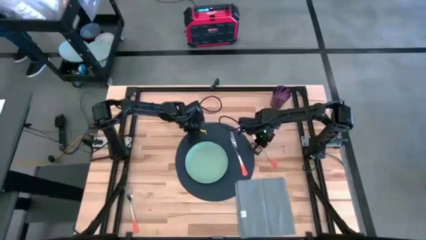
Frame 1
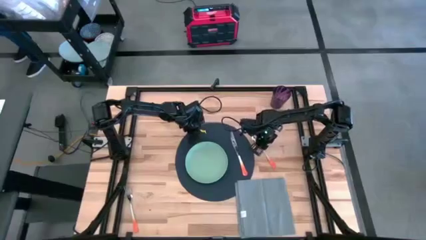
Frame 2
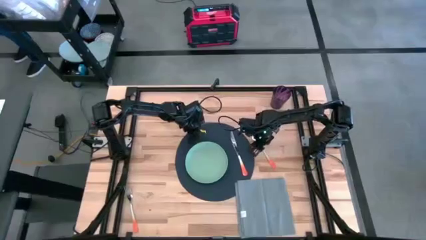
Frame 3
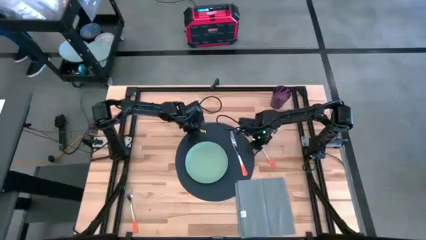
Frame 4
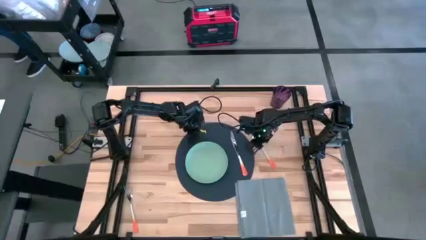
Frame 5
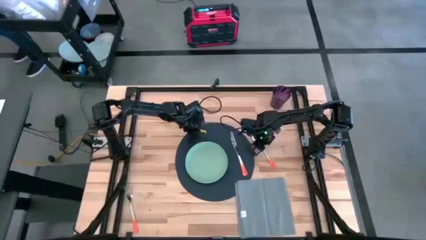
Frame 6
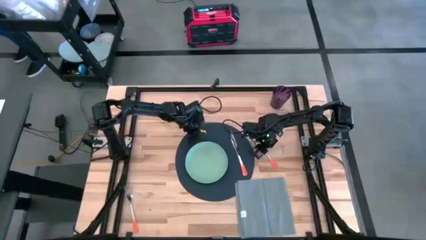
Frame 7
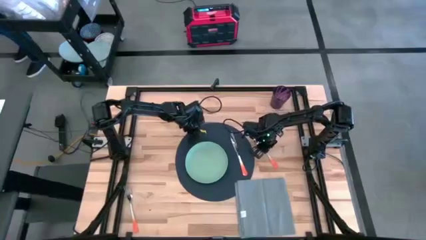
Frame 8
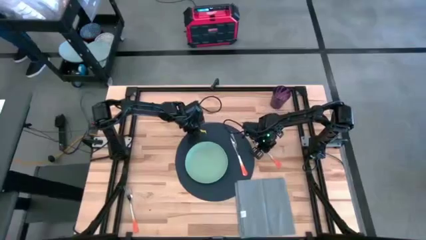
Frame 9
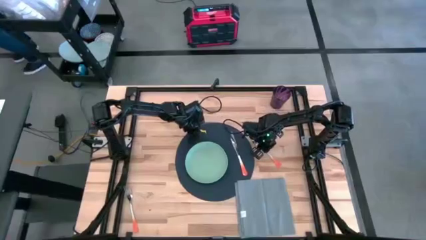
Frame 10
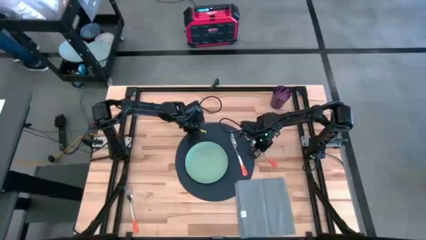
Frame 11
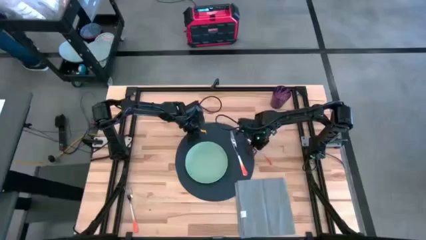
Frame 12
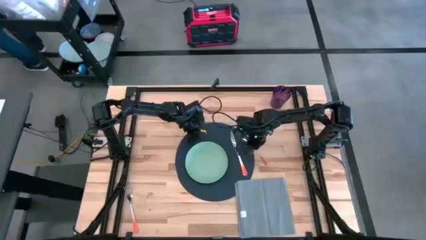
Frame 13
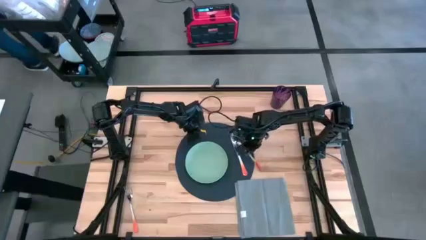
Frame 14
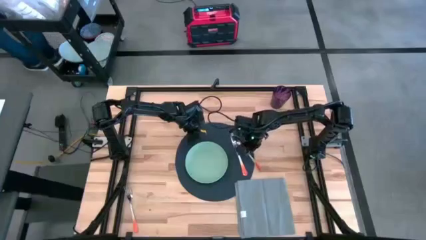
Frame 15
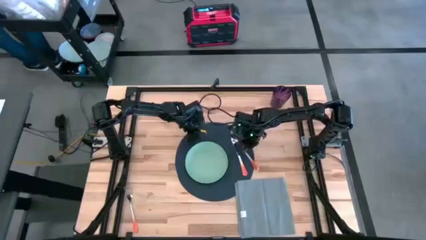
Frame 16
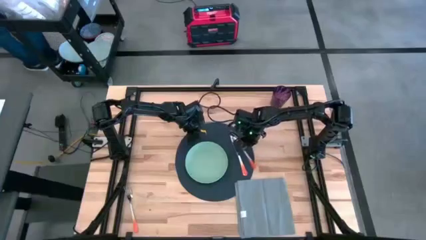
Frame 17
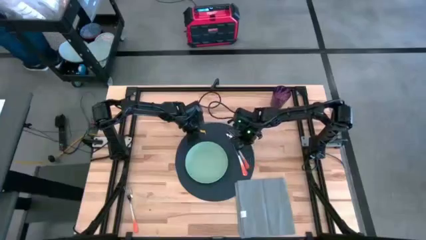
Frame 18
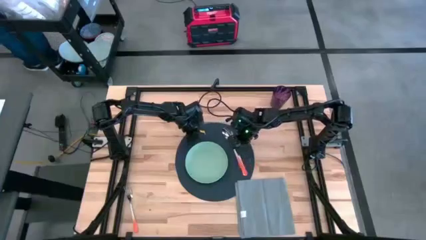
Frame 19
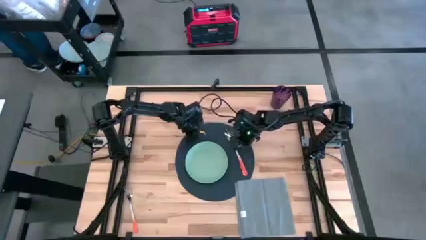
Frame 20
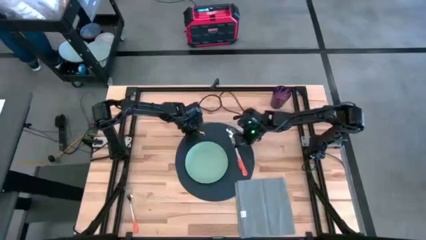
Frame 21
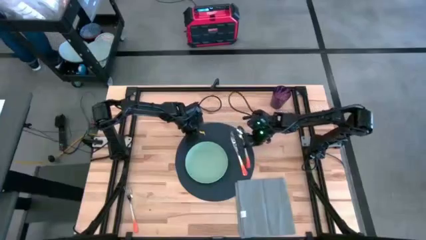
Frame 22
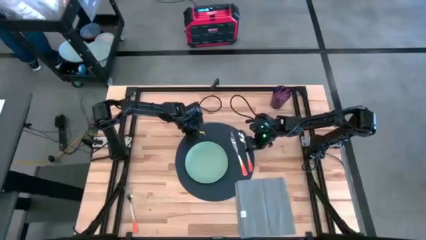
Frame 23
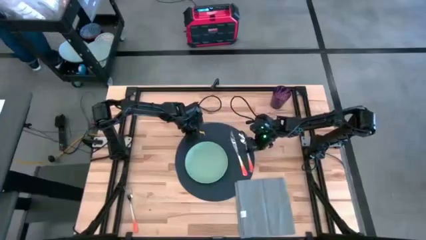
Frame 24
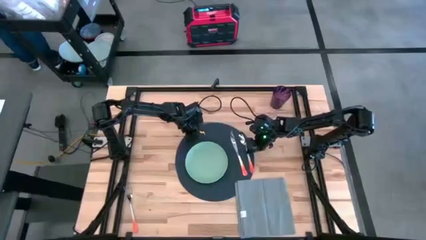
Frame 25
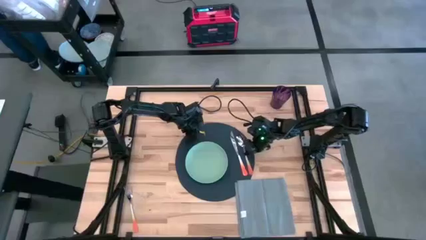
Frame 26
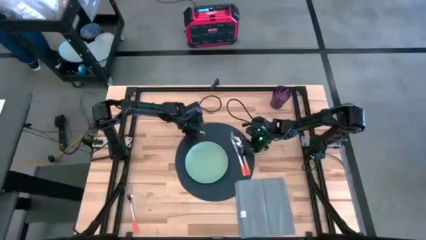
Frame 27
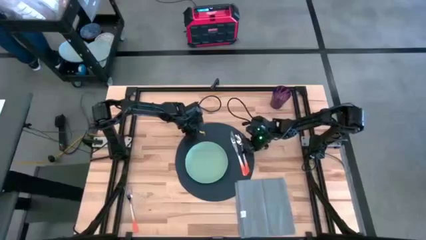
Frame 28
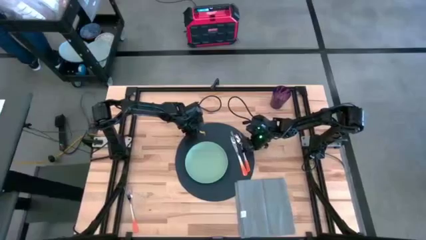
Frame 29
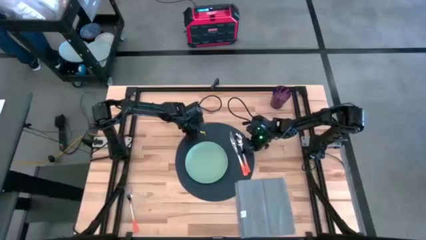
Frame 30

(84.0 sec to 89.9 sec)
Task: Set table place
Put the orange spoon on the blue placemat to the right of the orange fork

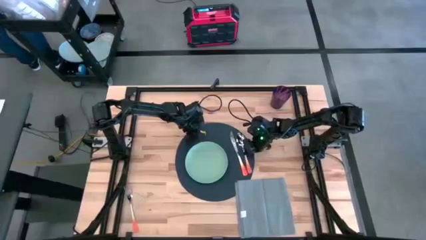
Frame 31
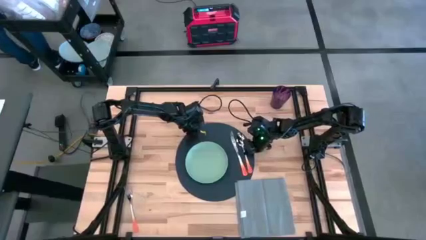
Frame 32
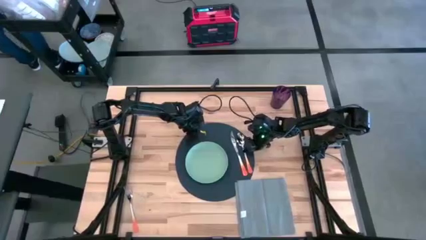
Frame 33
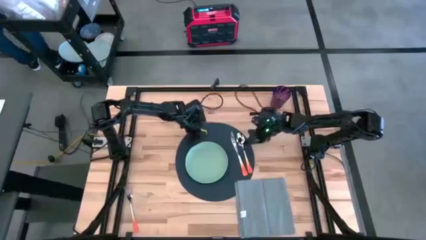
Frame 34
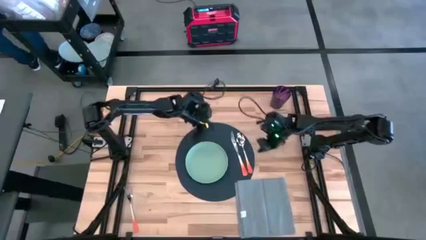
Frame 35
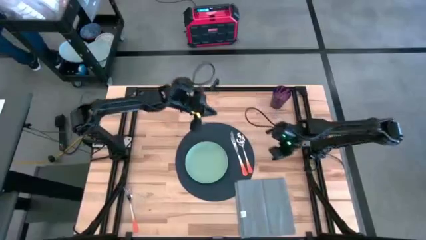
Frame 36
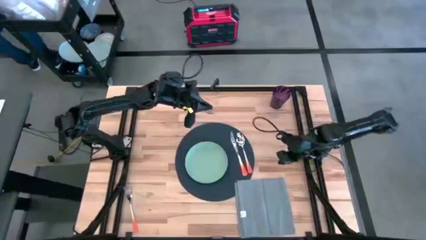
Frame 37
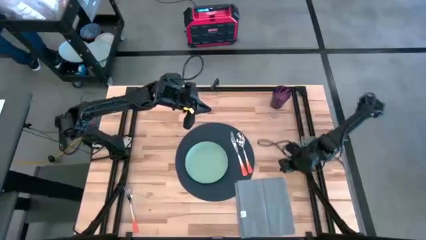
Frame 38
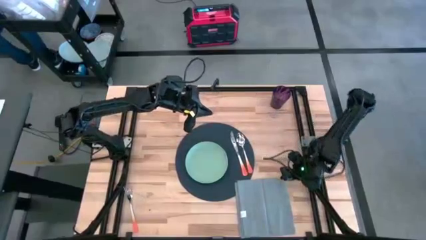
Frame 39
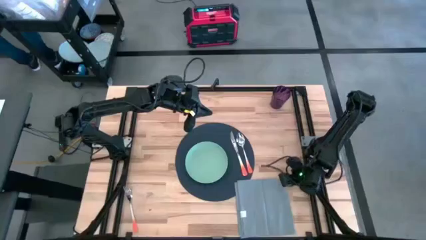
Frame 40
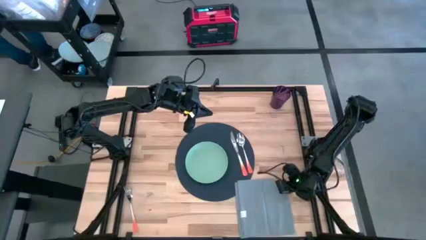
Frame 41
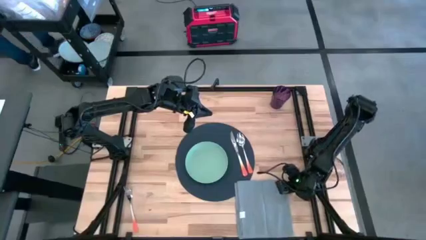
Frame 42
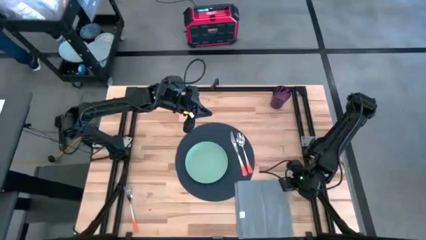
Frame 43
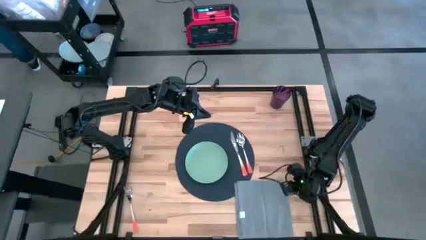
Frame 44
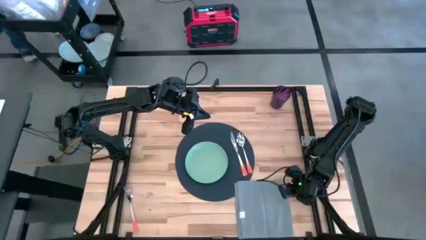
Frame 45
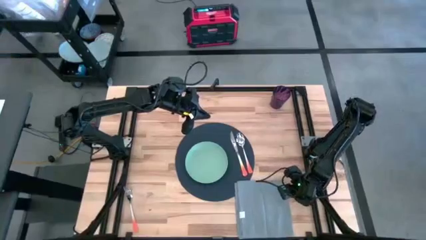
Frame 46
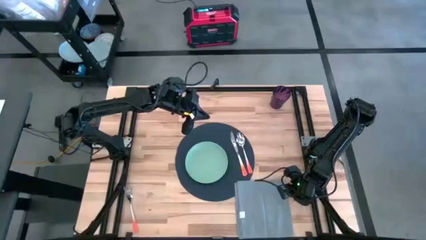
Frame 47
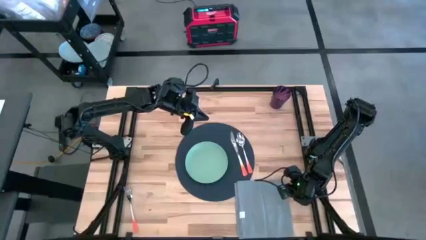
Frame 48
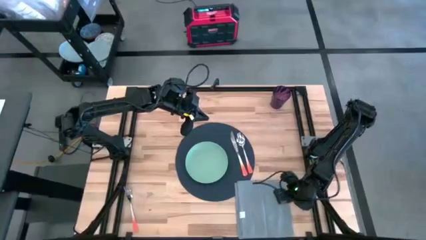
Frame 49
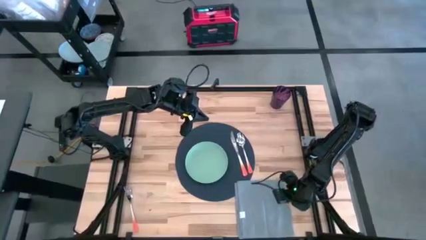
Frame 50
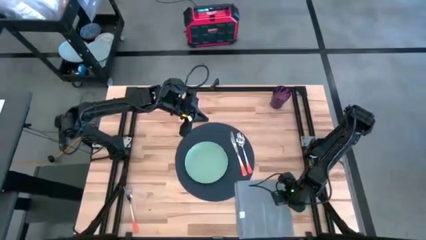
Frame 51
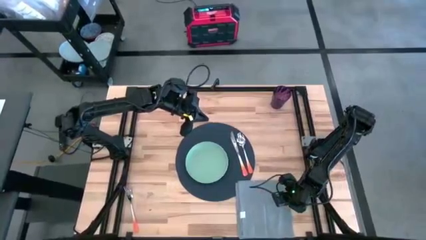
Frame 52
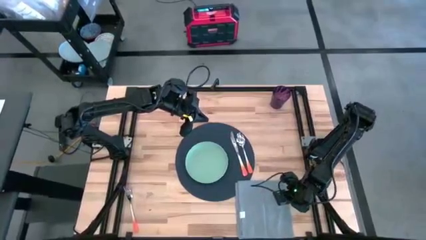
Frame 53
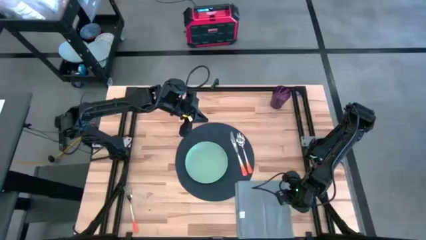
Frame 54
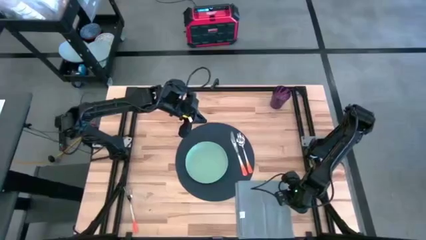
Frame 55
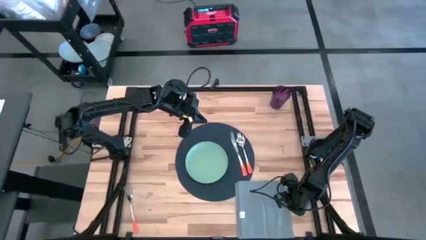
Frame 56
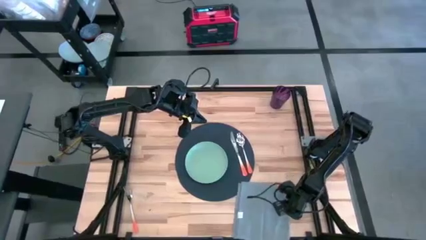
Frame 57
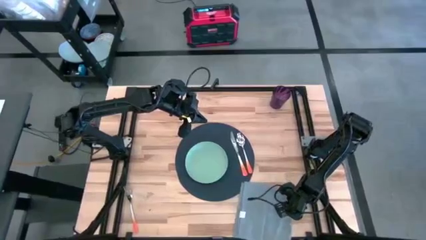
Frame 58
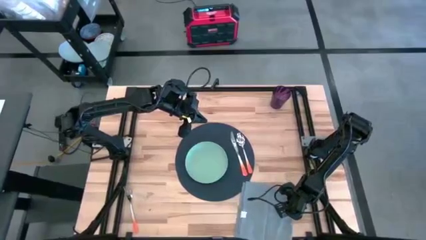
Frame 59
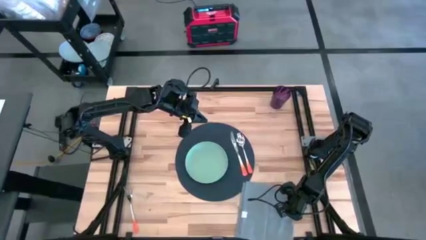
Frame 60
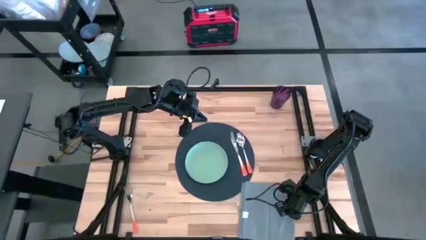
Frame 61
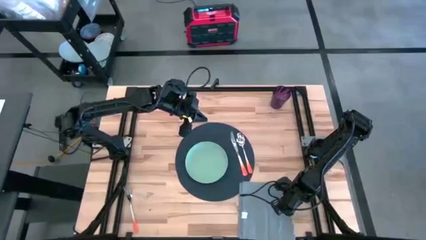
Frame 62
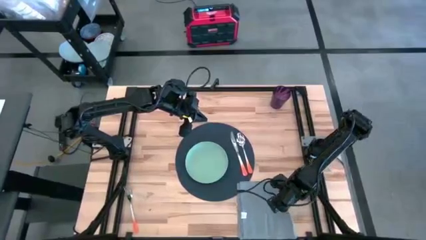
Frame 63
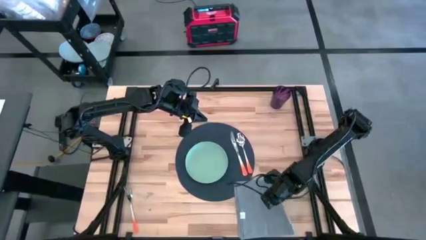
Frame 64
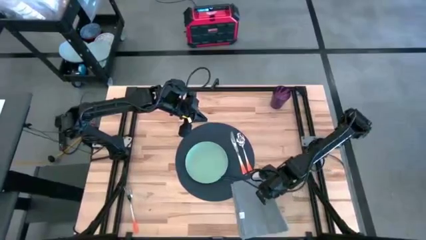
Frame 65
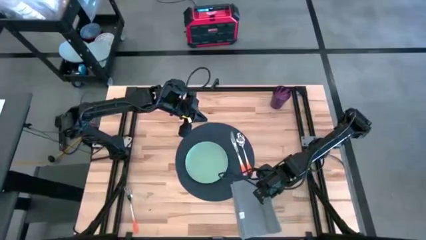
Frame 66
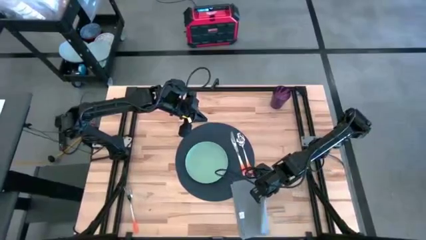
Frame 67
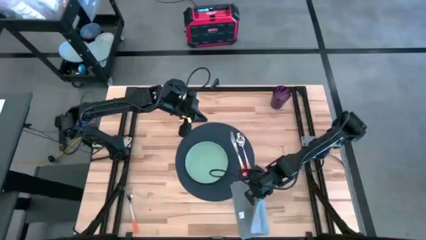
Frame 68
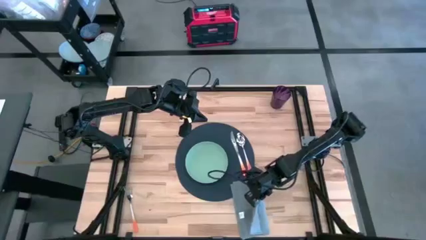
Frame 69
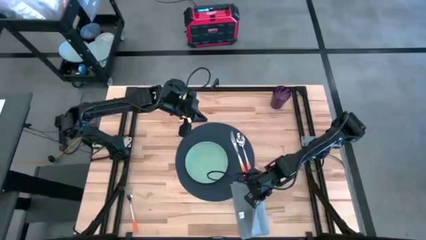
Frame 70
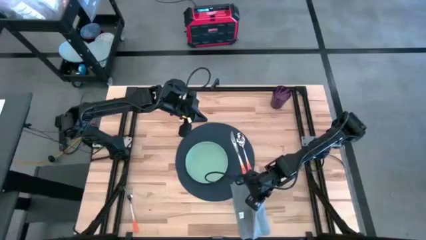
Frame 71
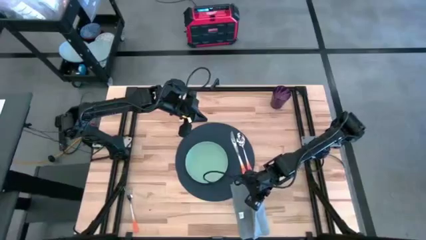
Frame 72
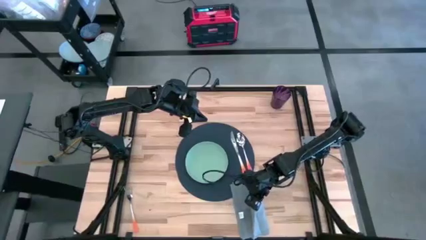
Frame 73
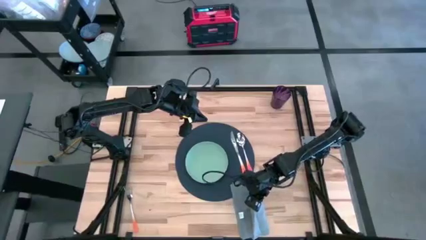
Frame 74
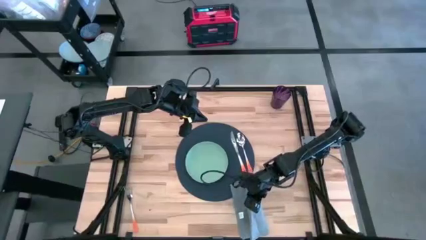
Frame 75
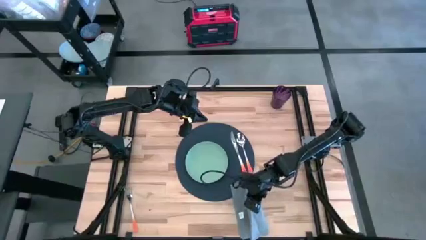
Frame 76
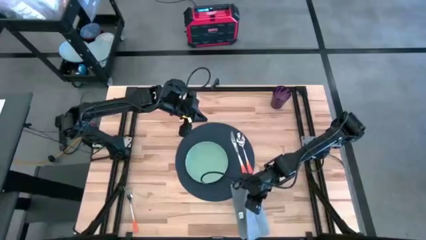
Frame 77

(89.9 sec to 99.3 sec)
Fold the gray table napkin

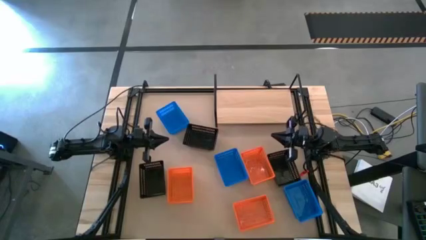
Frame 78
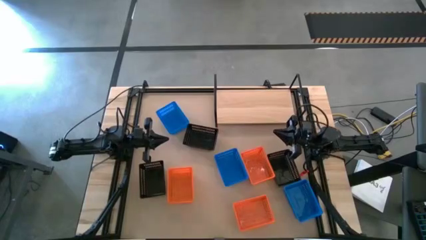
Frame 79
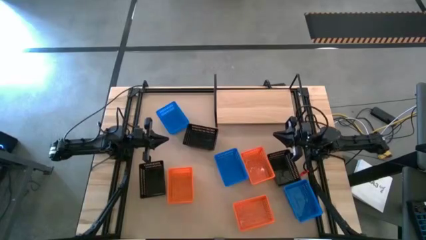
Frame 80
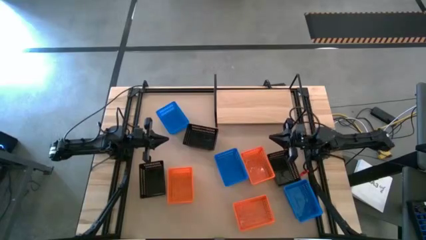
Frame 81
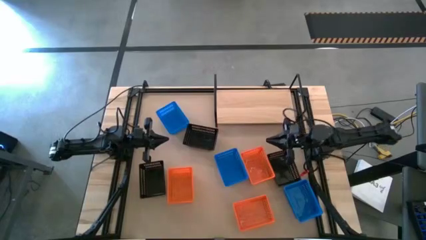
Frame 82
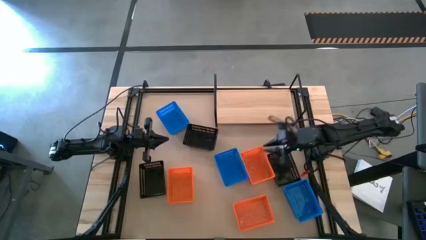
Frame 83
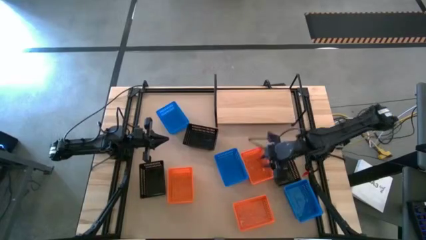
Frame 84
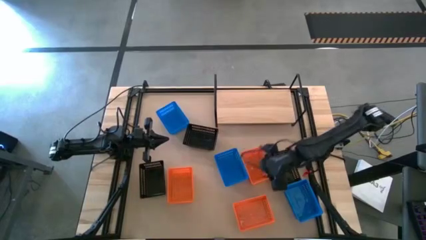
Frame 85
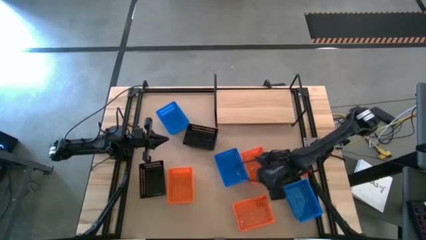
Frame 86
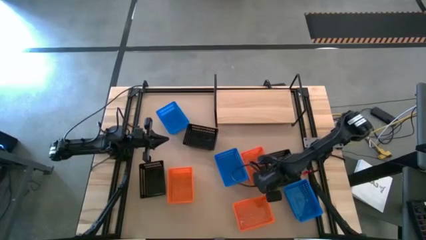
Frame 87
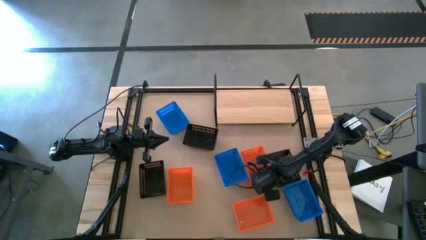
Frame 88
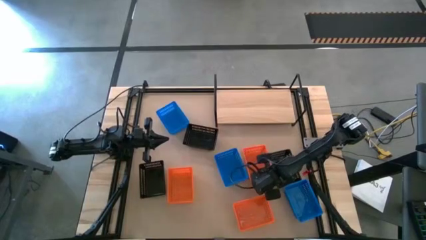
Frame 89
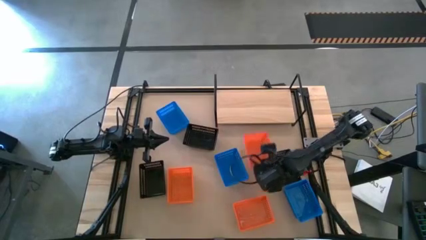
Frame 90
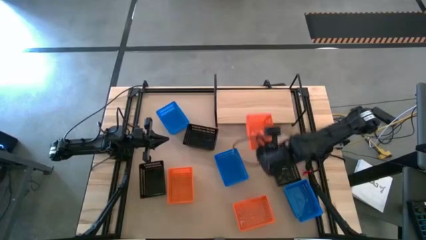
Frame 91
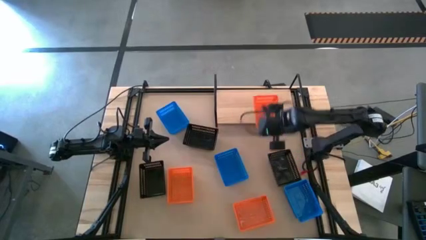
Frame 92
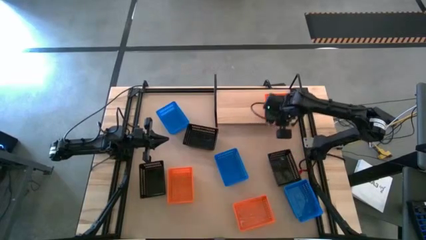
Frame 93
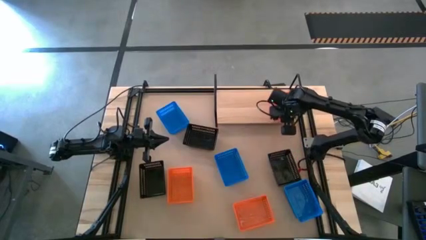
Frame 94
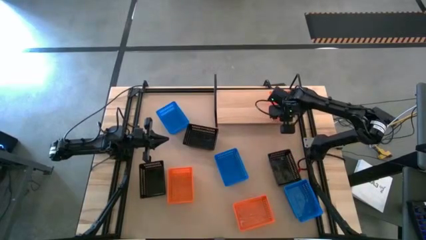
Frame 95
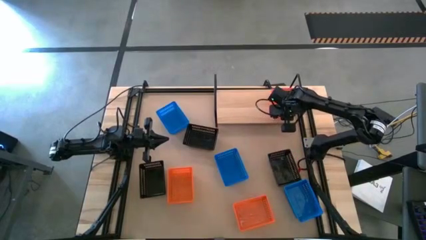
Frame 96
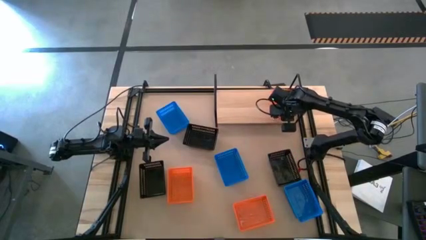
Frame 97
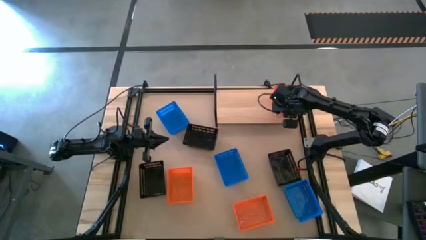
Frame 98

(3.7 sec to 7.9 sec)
Task: Stack baskets on shelf by color
Put the top right orange bin on the shelf
